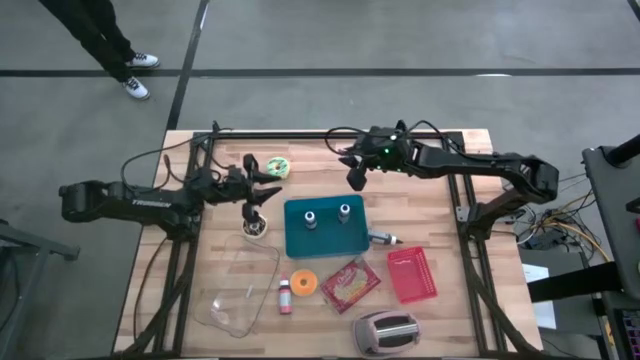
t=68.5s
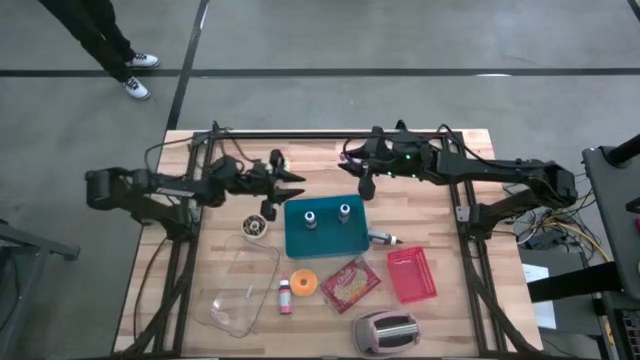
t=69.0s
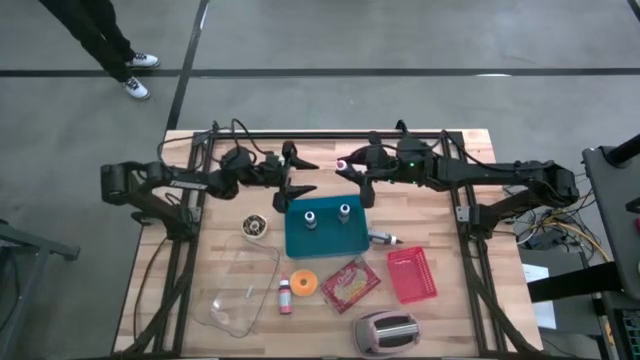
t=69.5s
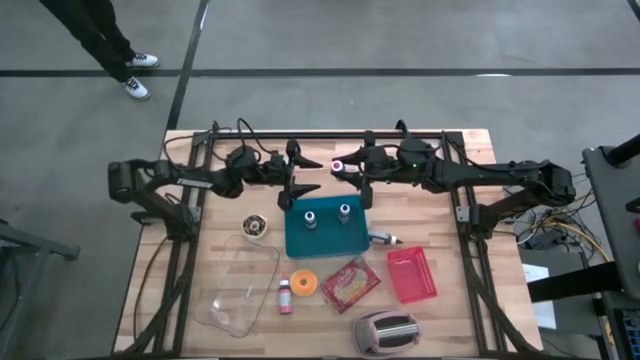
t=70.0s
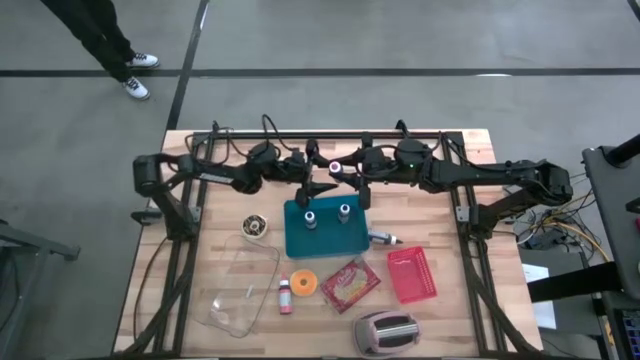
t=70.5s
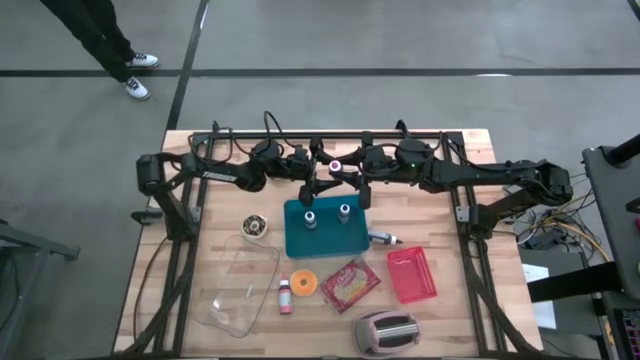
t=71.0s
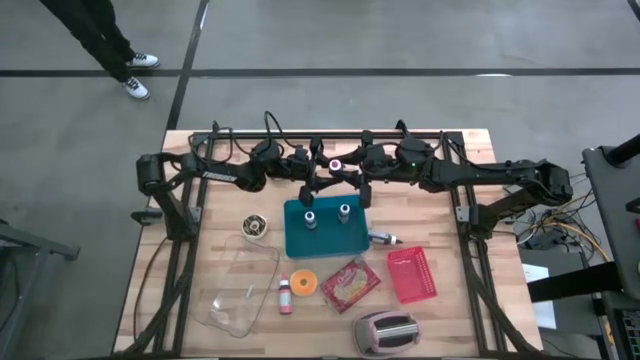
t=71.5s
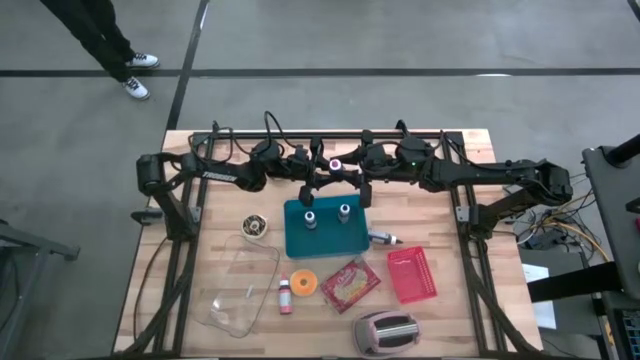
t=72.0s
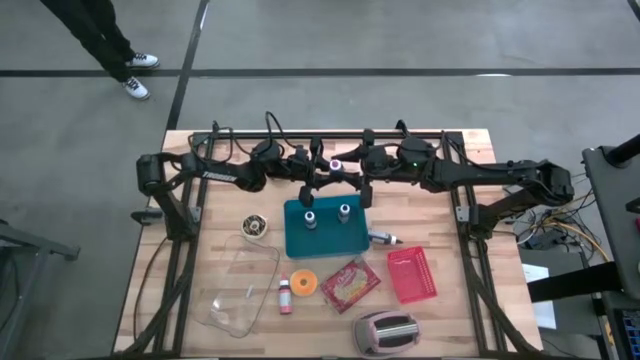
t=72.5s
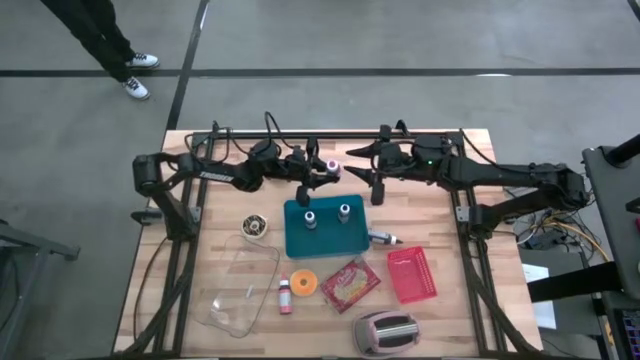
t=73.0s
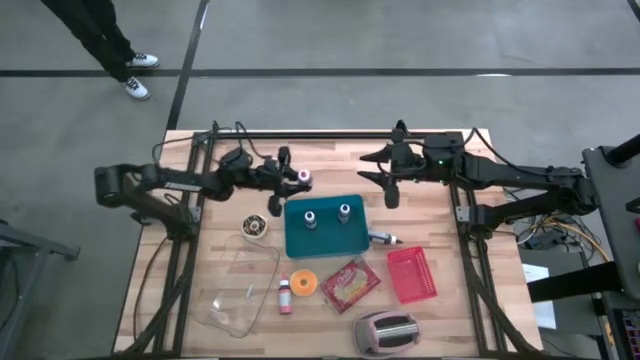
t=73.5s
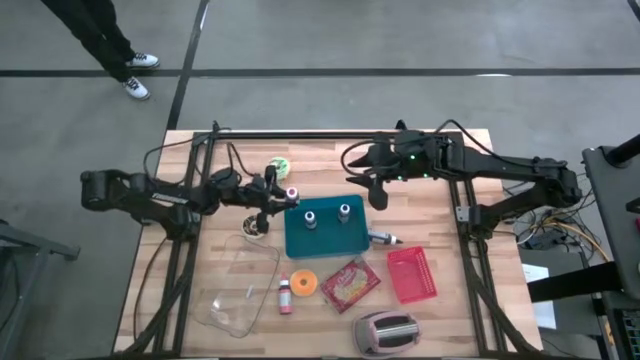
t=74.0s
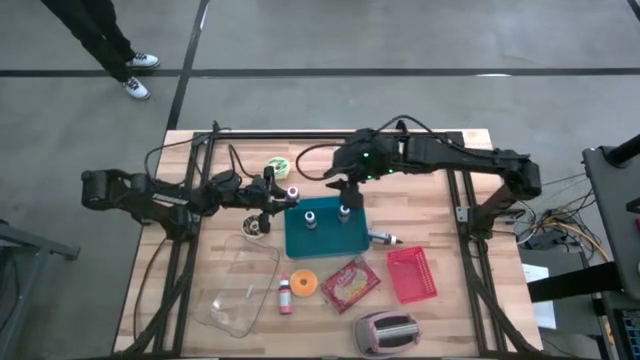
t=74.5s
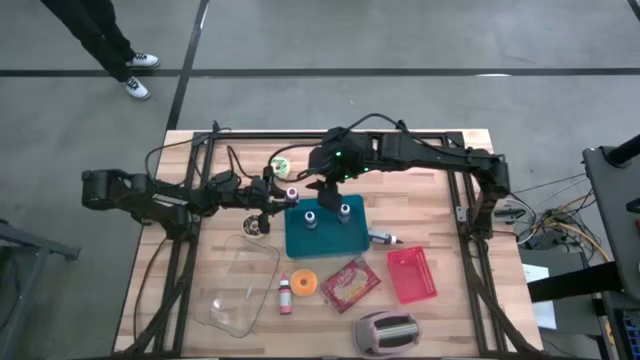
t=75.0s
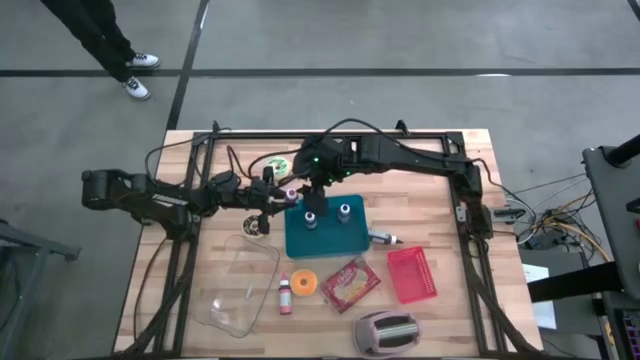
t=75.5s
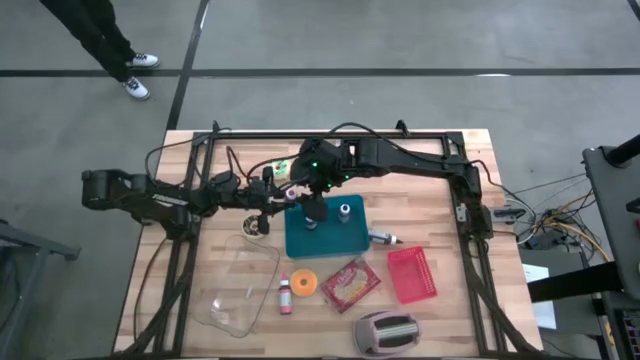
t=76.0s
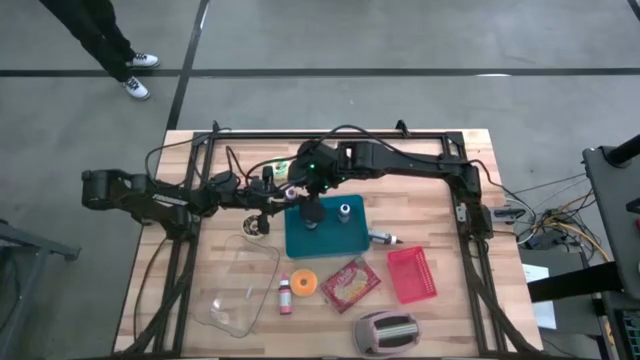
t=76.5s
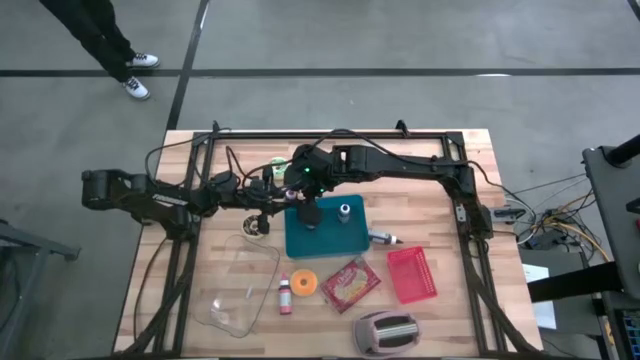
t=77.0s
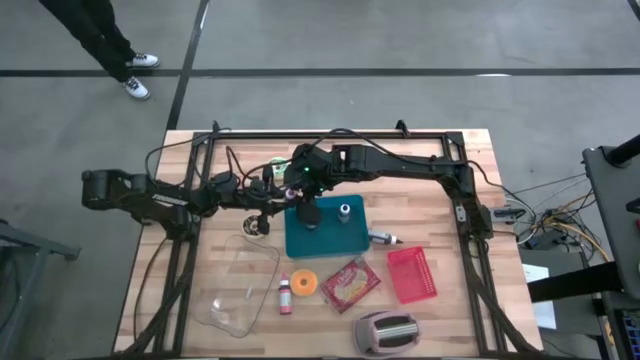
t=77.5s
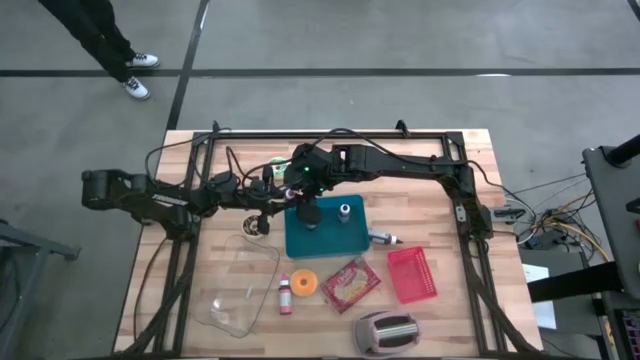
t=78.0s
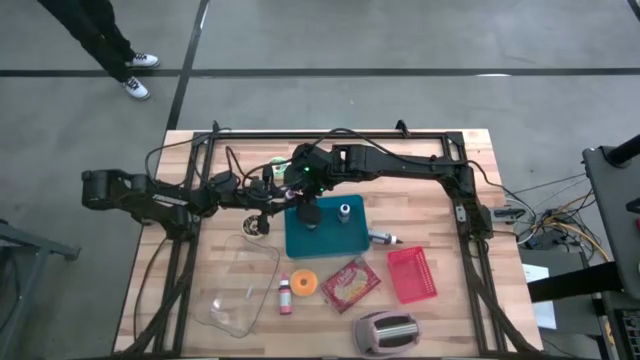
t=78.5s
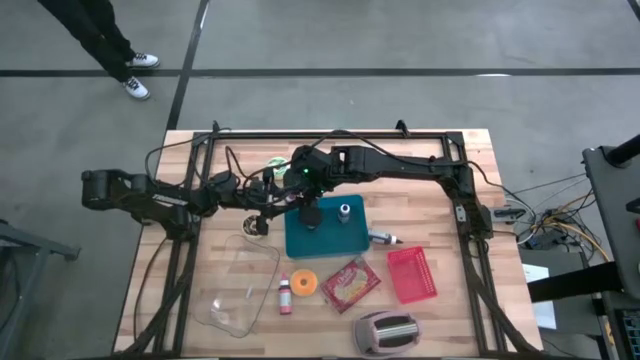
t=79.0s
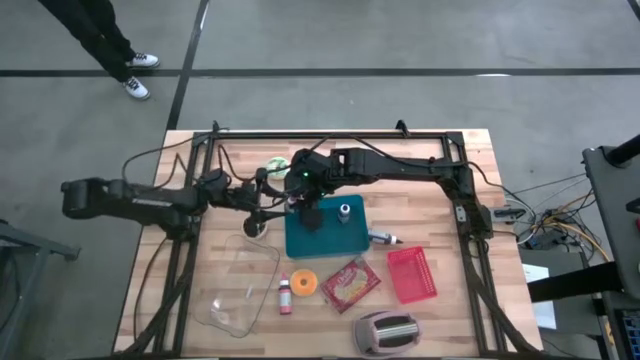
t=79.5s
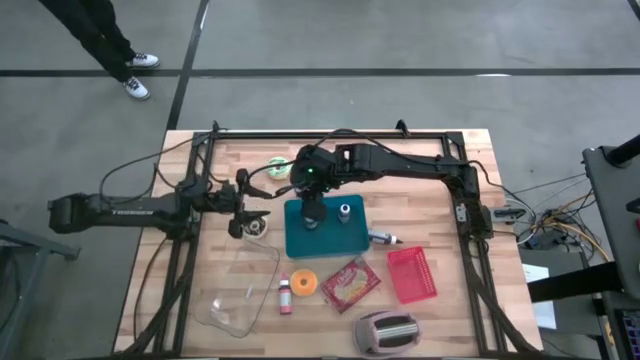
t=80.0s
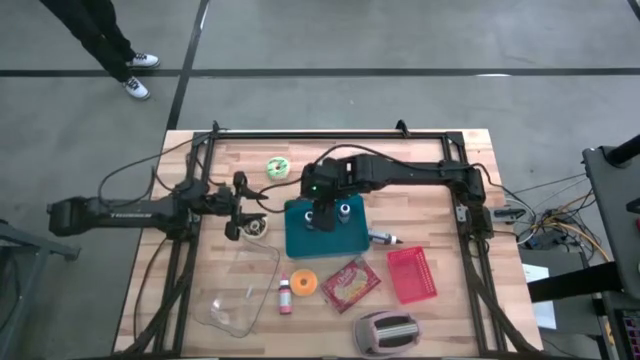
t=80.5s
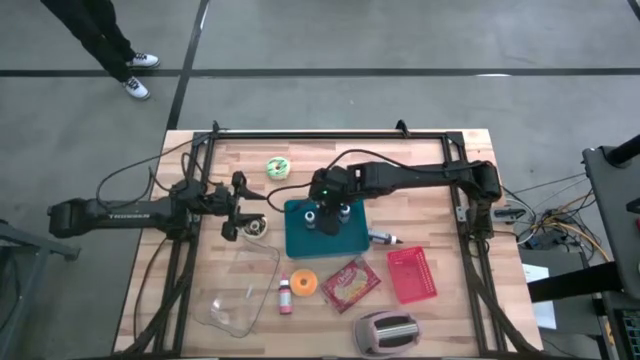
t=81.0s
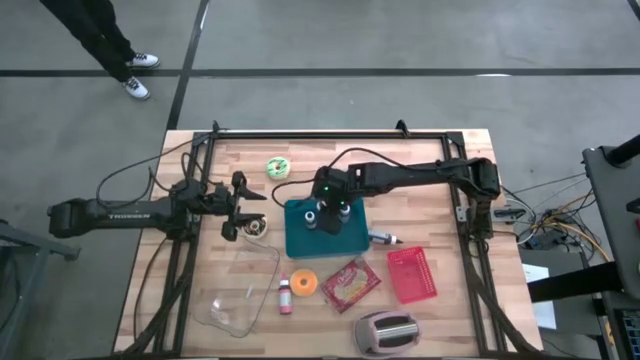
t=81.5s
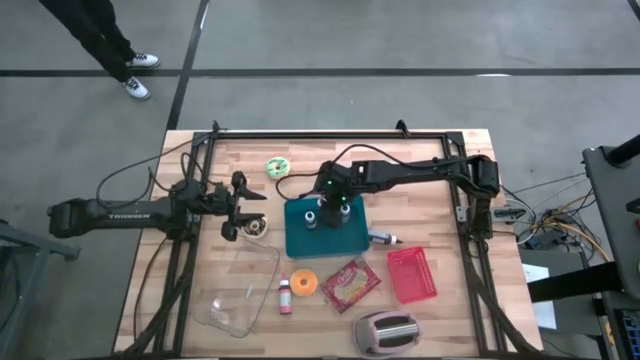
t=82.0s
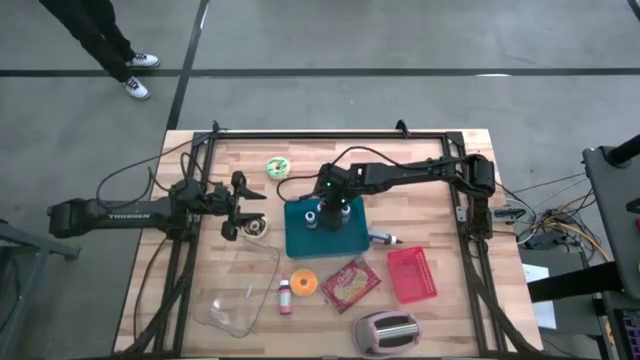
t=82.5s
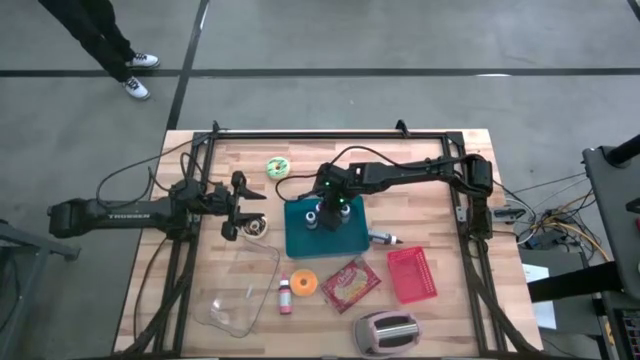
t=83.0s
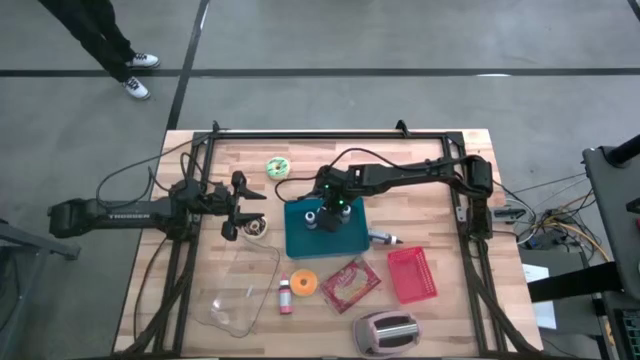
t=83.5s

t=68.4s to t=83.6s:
Task: Pick & Place Food Item
Put the top pink food coloring bottle into the blue bin

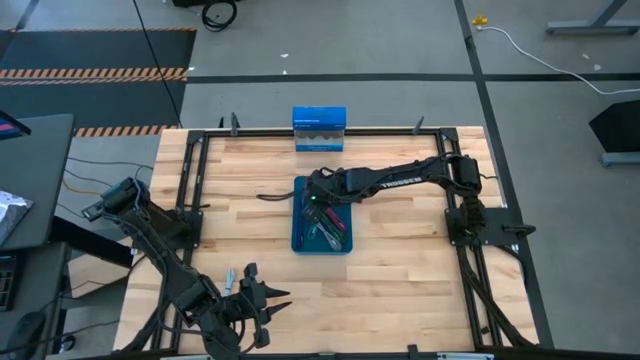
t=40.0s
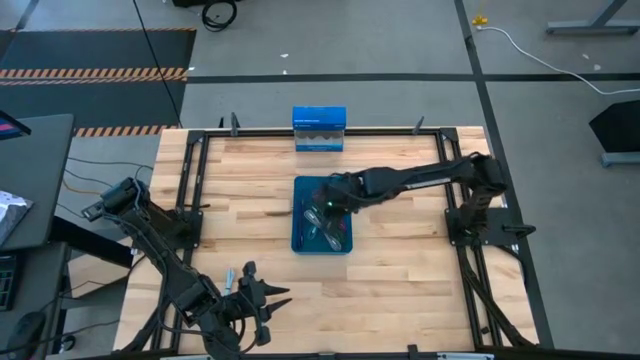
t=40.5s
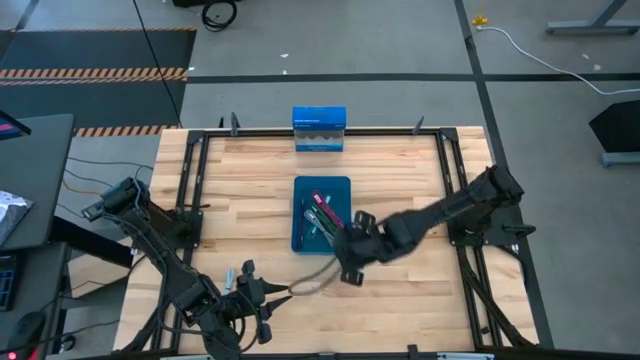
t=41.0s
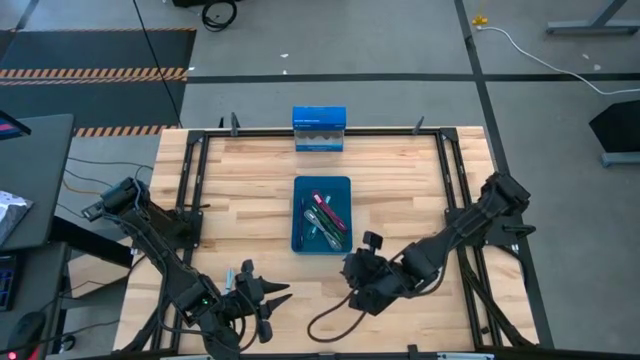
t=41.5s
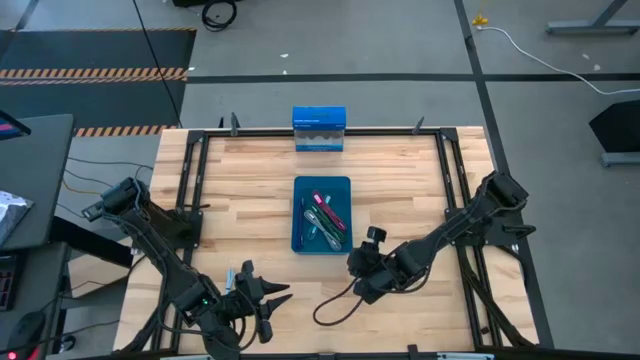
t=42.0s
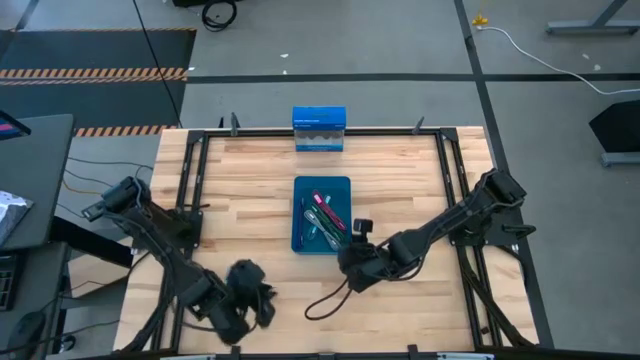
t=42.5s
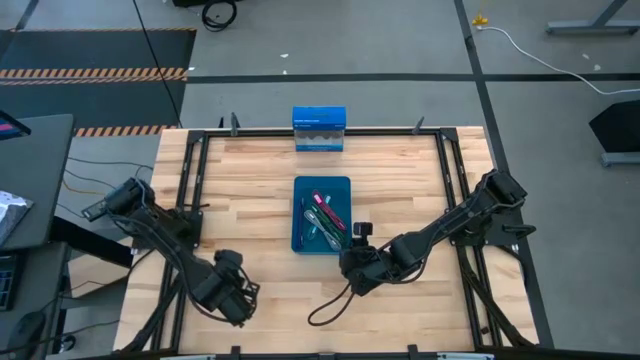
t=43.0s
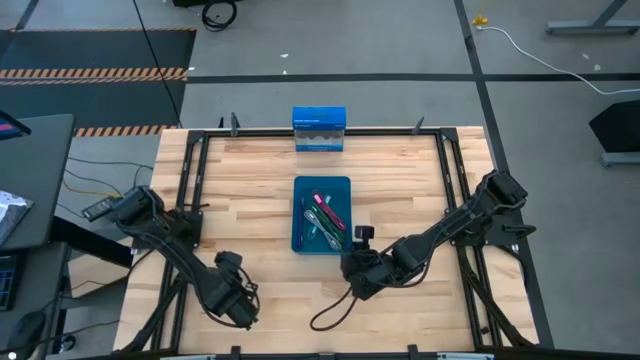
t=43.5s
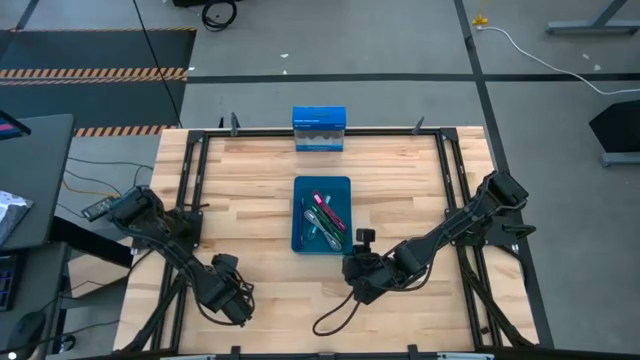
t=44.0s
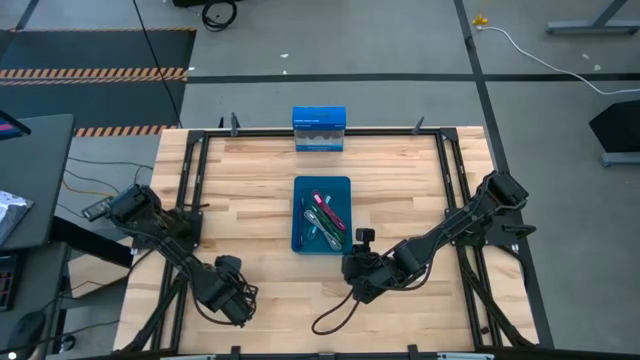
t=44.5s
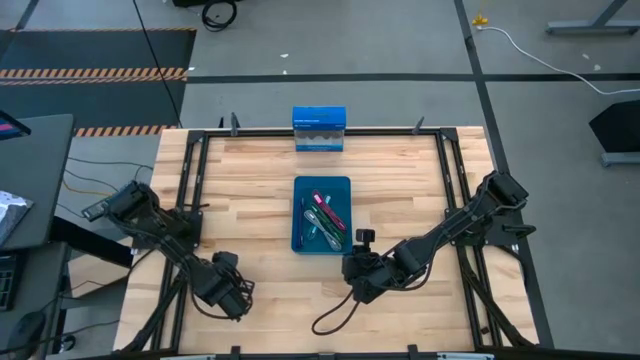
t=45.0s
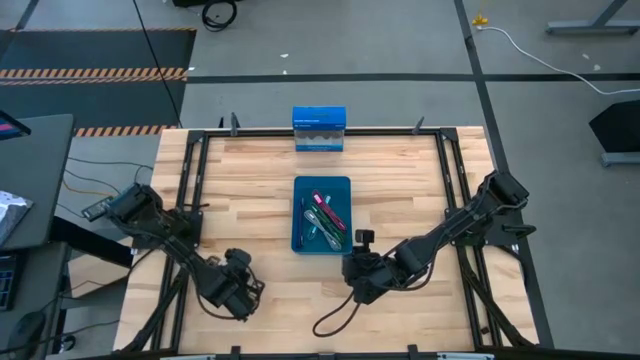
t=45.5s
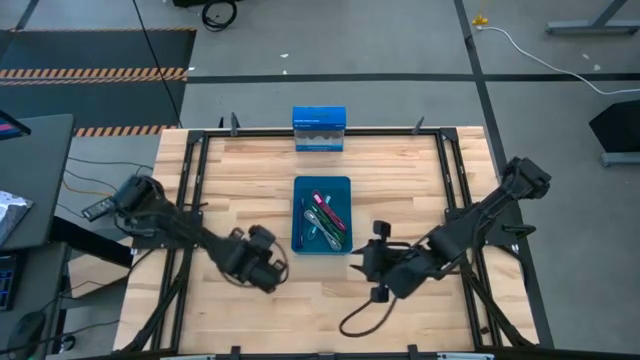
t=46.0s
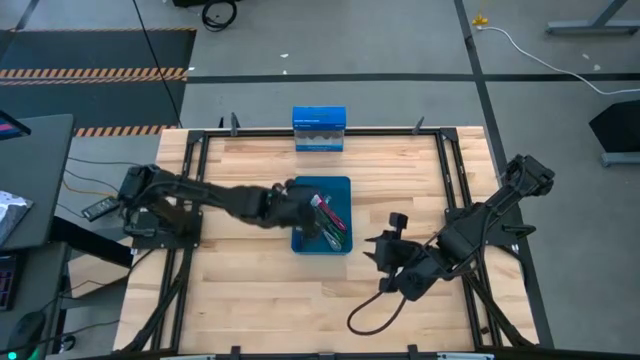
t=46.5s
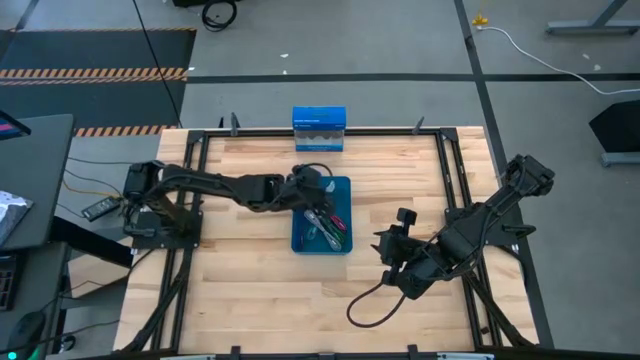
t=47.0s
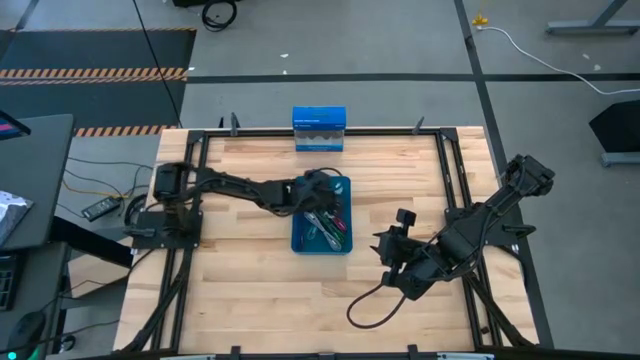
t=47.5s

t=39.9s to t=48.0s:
Task: Pick and place USB-C Cables
Put the light blue charger cable into the blue bin
